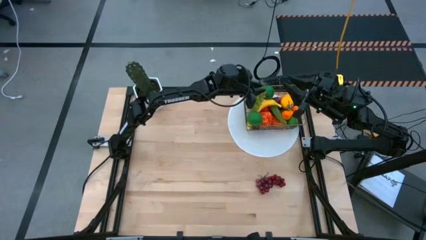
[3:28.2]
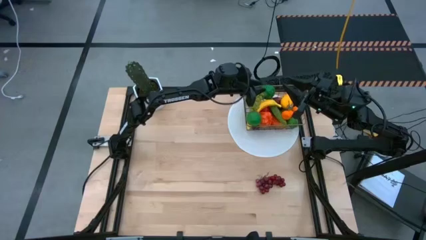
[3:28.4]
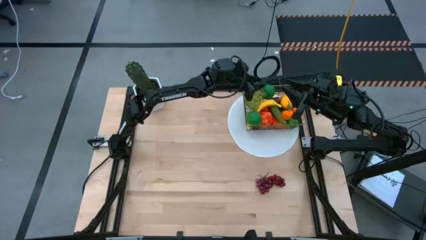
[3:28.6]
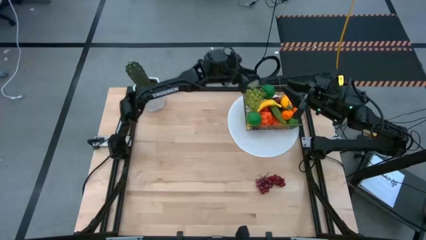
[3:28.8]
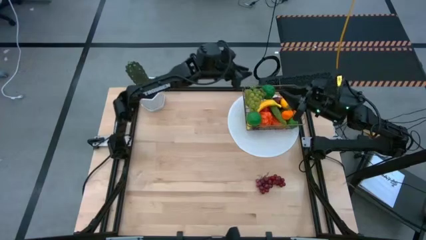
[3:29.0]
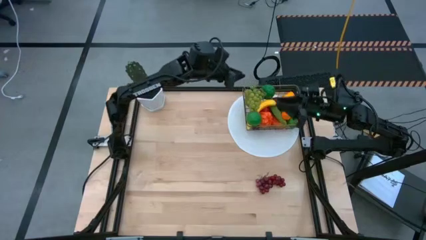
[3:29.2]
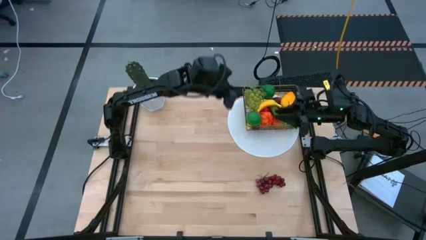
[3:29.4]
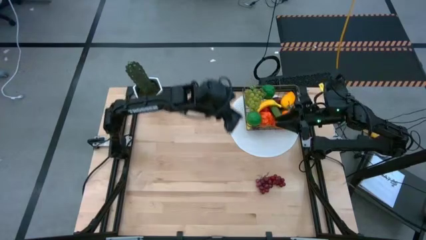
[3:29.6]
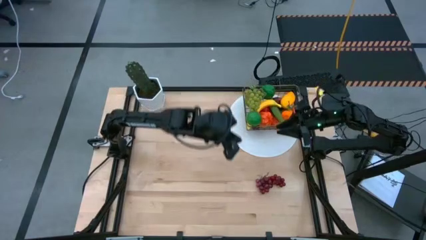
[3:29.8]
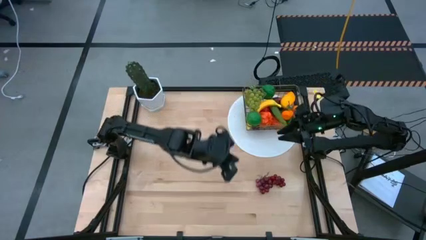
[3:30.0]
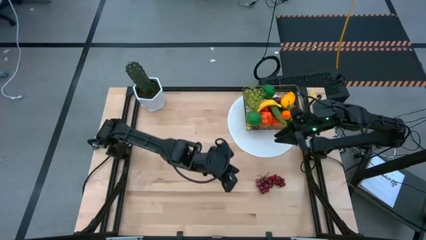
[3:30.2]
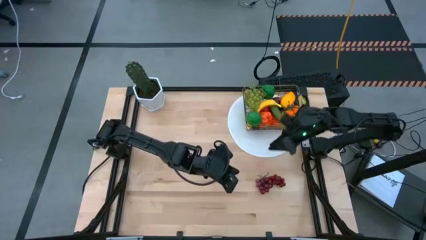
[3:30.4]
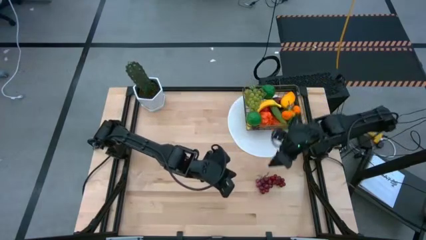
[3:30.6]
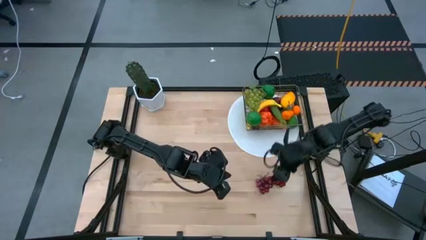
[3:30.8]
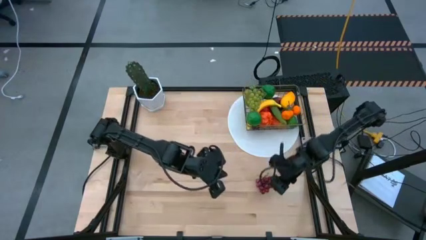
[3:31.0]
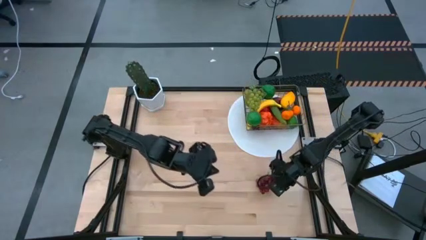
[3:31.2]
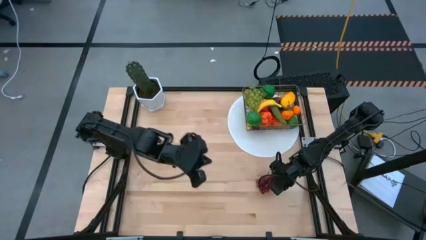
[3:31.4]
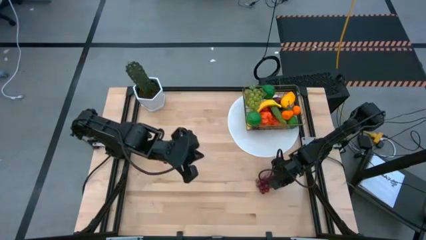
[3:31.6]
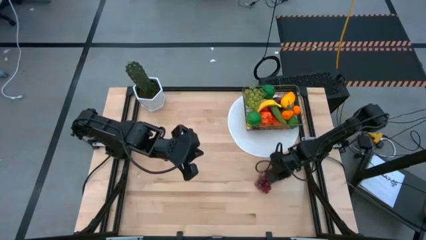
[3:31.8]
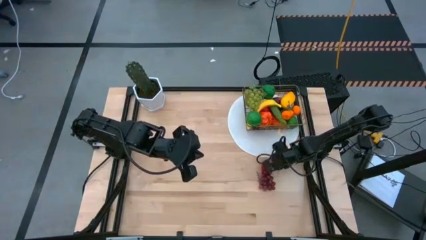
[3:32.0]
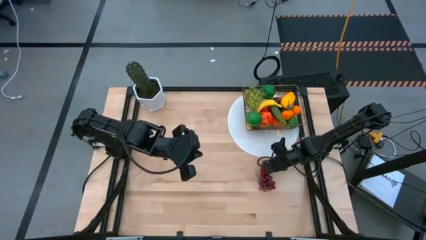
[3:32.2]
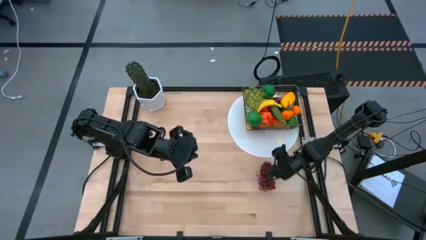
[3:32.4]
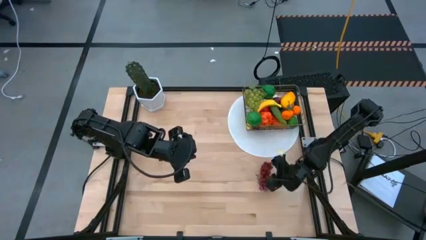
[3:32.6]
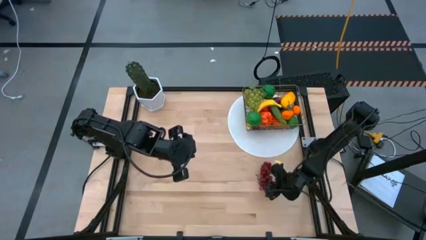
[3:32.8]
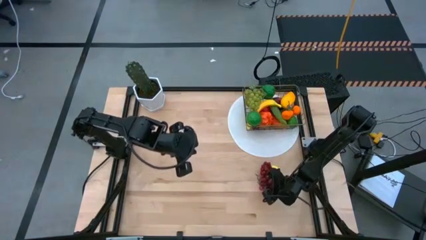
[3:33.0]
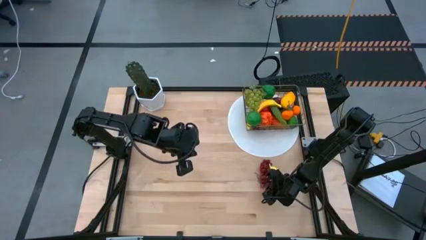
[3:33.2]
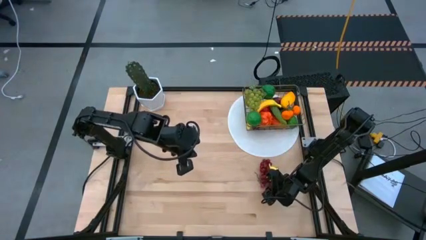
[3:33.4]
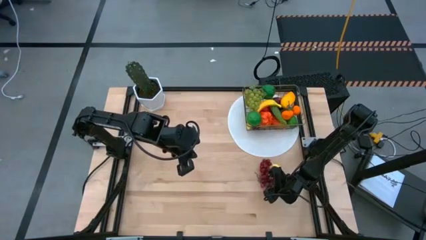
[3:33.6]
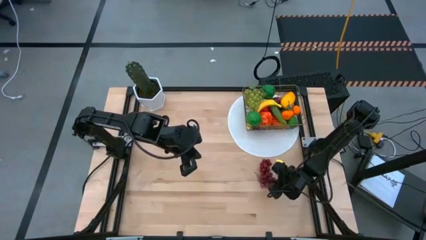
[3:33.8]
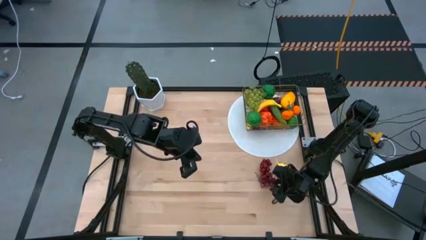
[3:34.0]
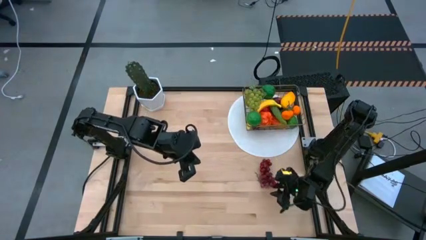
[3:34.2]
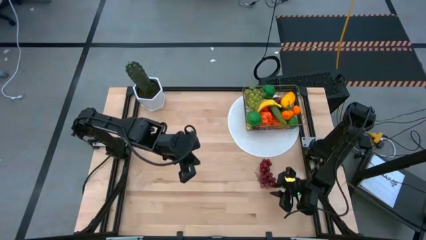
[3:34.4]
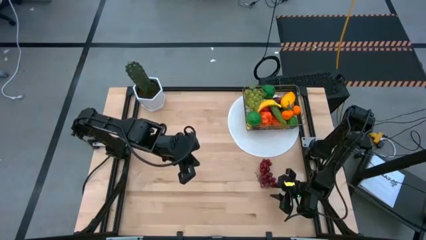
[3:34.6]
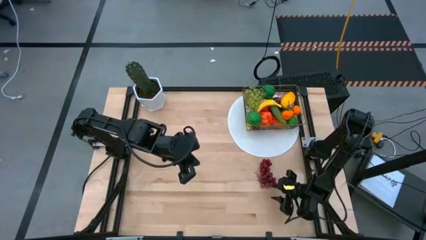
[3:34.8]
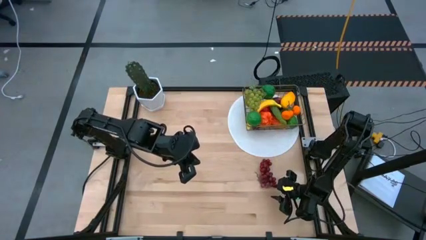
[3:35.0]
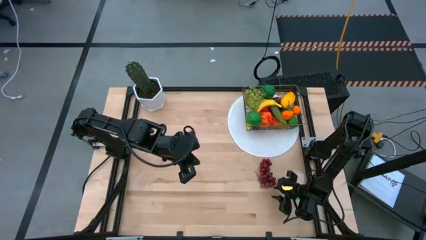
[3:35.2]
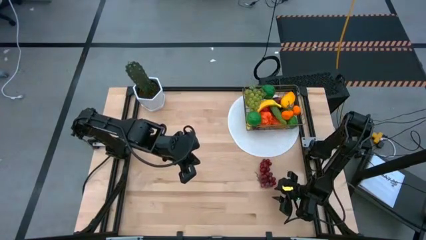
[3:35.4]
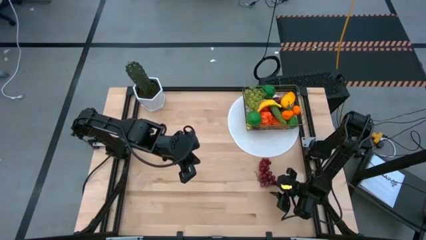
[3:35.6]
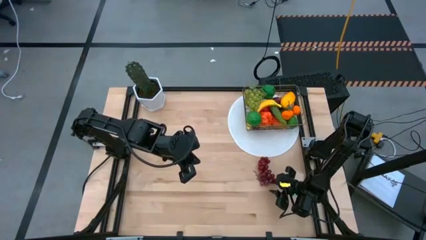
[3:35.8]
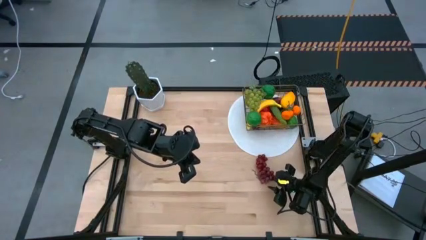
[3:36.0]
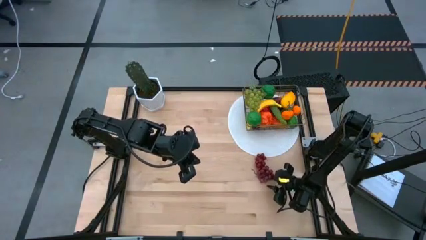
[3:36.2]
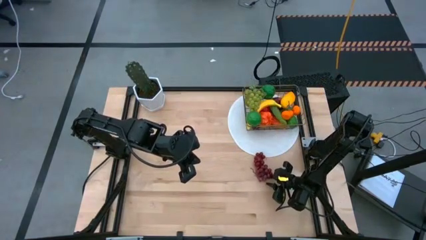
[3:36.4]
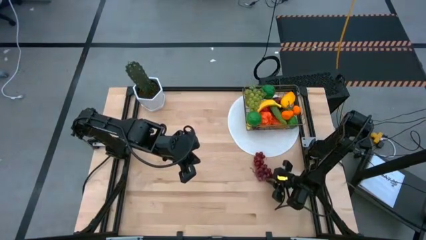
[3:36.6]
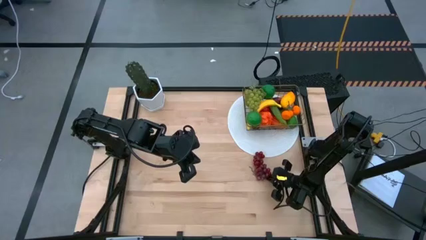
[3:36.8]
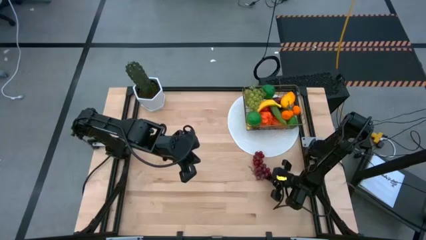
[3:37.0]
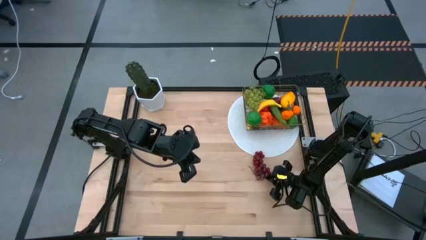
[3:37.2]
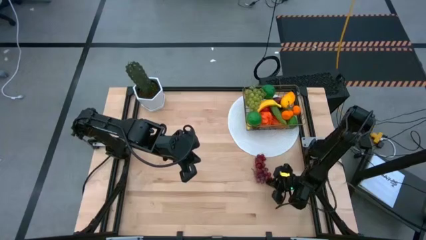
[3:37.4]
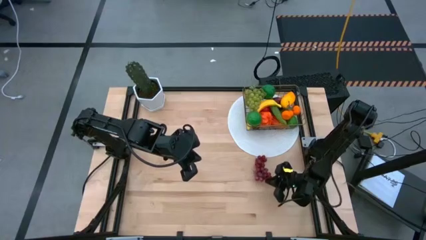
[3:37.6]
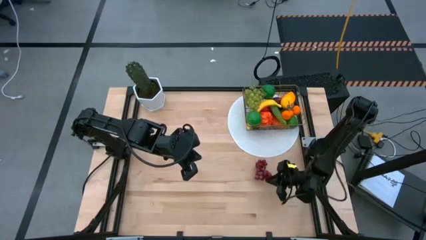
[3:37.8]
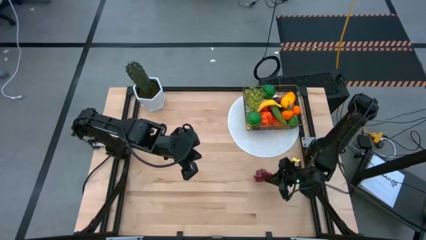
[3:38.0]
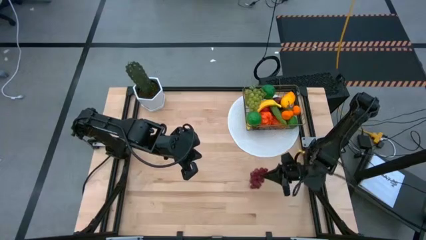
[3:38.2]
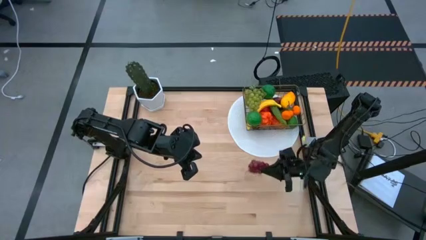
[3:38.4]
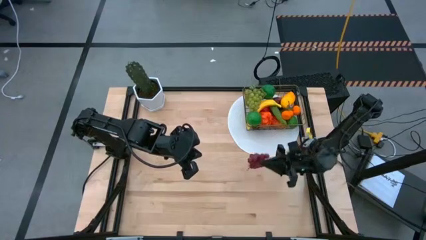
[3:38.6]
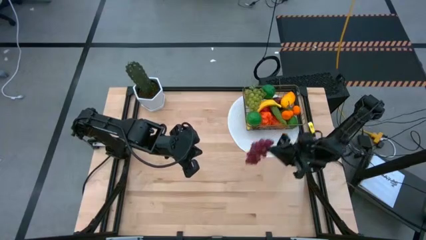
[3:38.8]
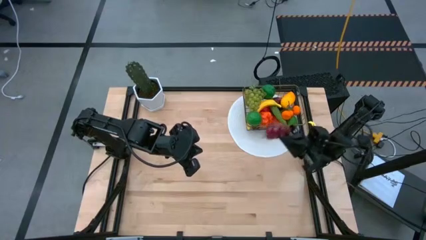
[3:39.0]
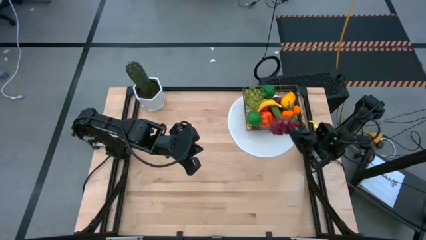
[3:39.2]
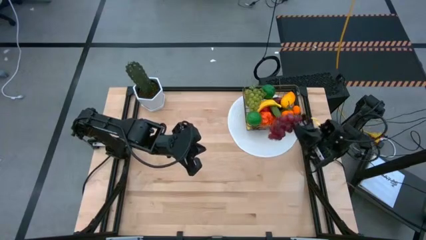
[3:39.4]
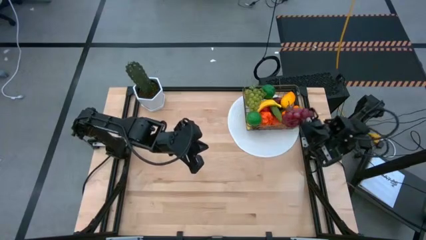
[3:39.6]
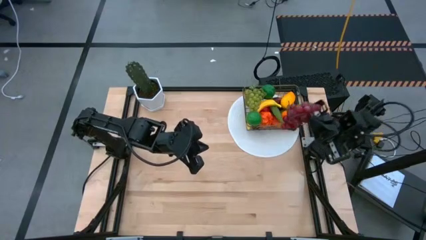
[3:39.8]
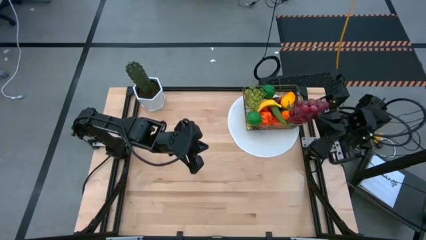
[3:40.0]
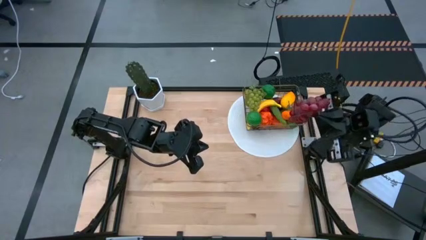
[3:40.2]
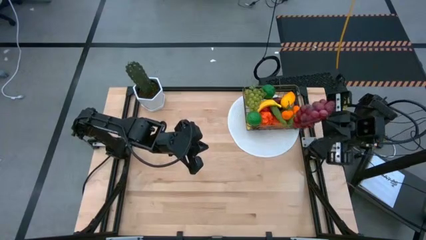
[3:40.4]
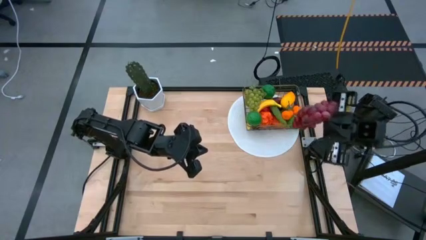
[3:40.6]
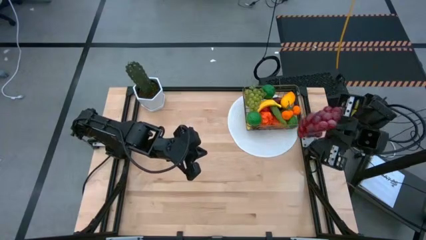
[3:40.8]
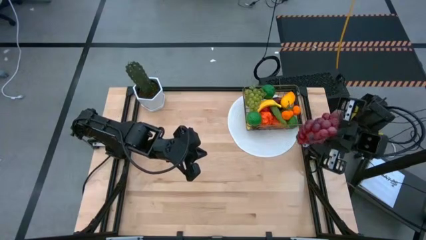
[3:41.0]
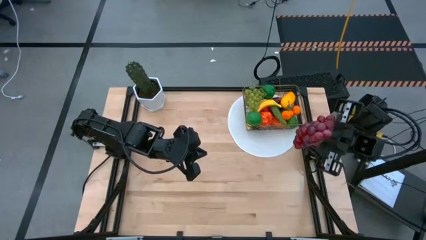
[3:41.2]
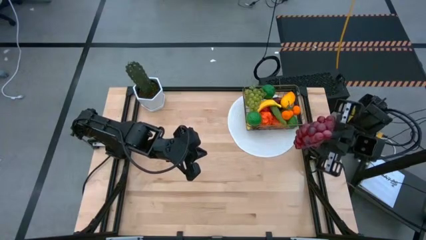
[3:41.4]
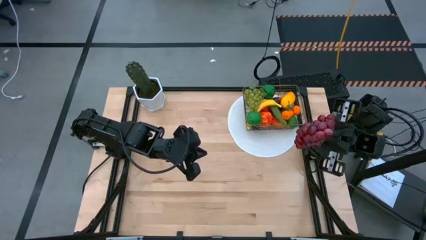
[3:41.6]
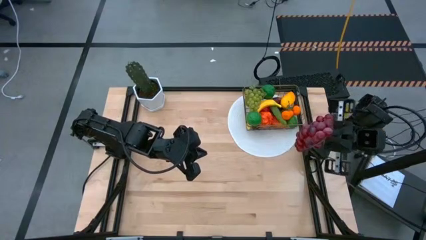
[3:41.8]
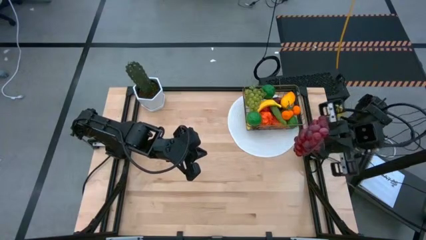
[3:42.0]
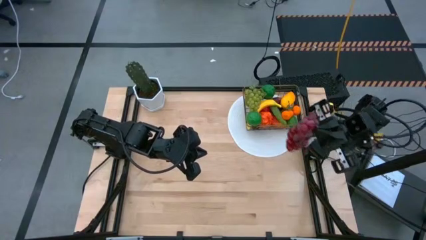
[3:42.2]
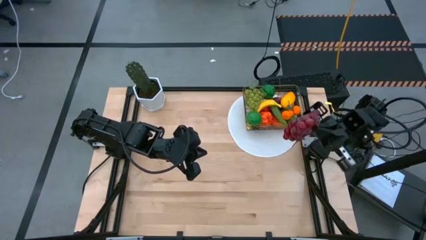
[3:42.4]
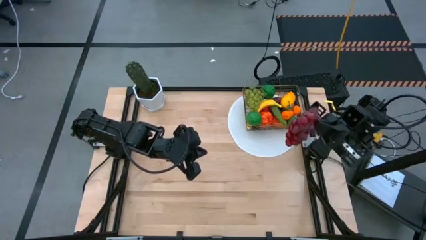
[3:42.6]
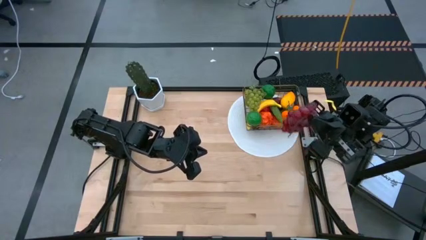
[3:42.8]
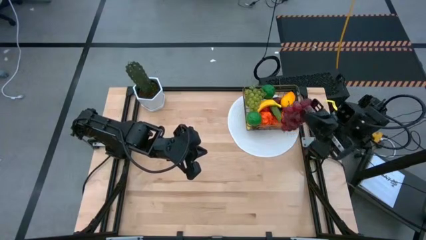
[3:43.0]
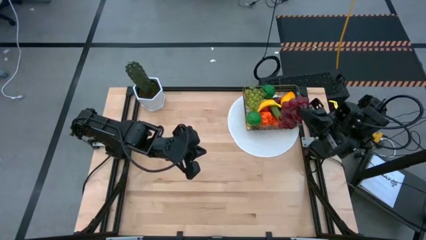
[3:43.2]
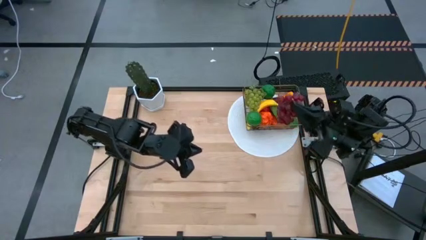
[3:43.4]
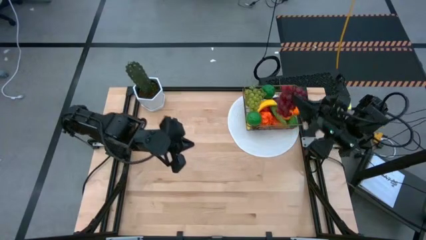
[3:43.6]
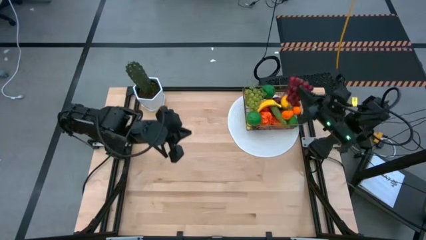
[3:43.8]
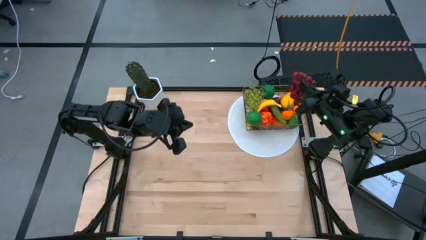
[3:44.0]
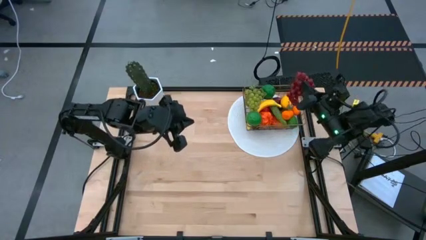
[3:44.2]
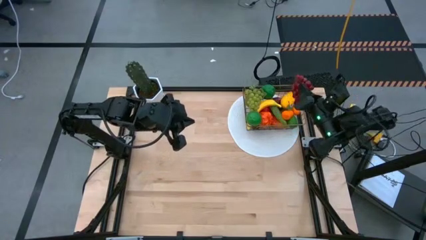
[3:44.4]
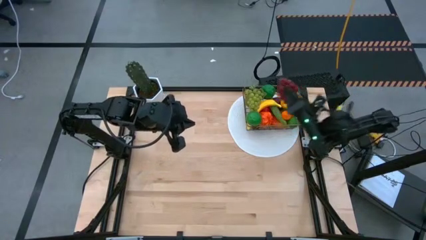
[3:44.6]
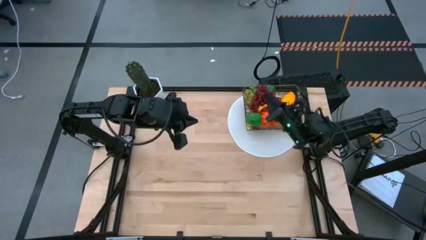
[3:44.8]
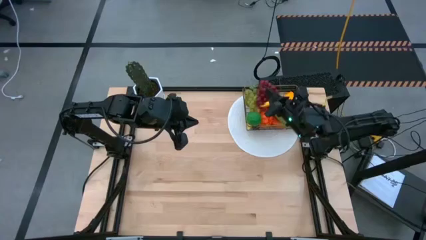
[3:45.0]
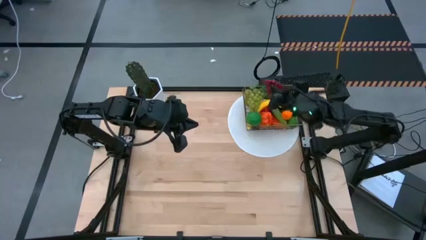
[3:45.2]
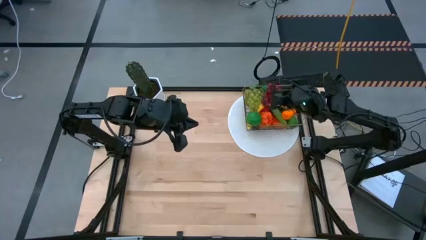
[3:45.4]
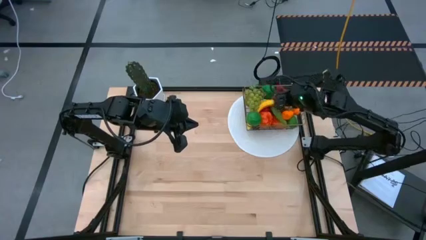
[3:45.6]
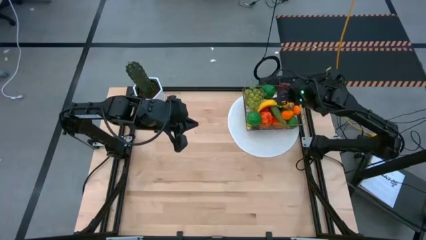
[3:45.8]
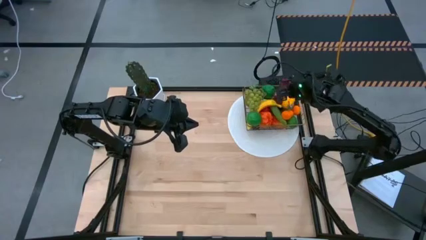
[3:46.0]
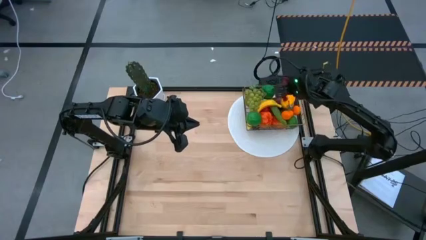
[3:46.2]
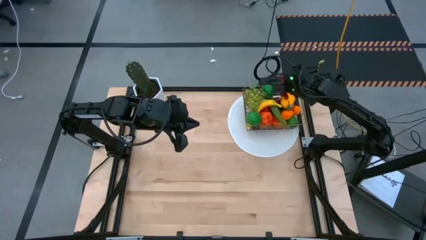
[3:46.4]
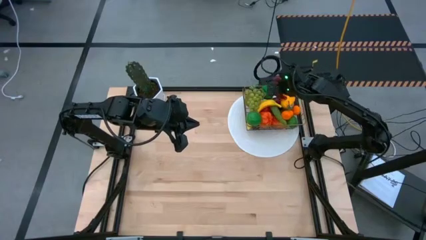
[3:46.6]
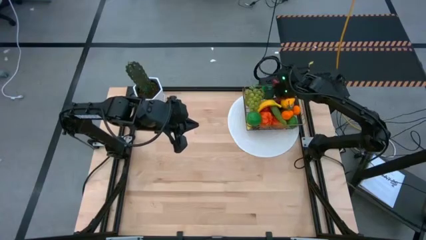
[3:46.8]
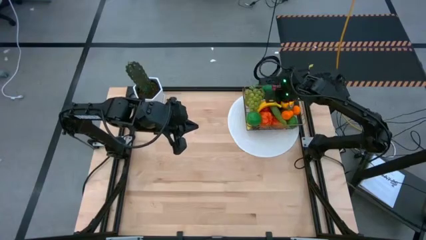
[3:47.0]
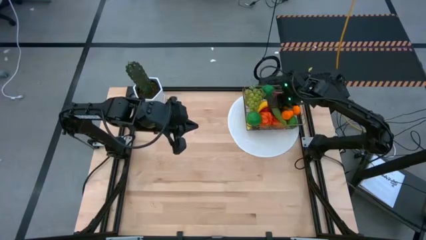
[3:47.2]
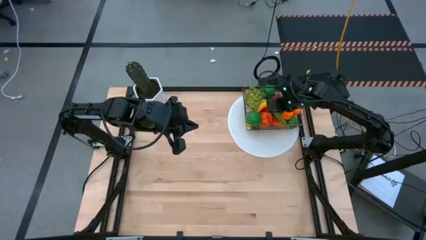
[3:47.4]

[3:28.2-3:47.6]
Task: Build produce basket
Put the red grapes into the gold wire basket
